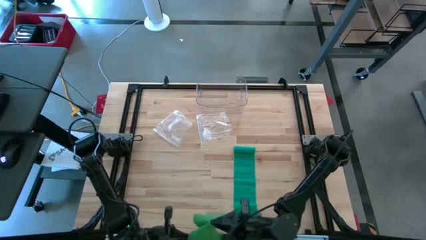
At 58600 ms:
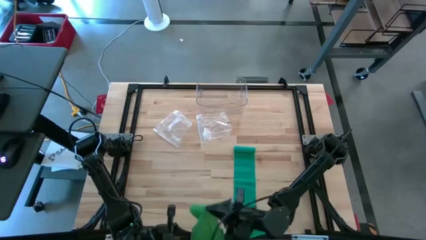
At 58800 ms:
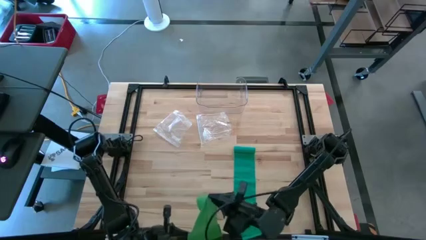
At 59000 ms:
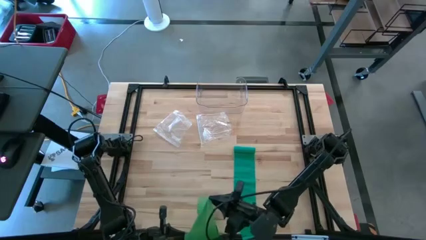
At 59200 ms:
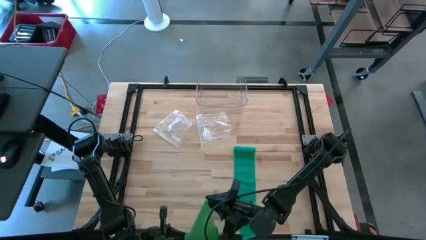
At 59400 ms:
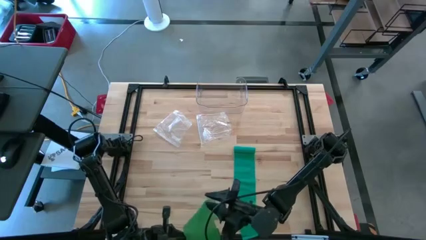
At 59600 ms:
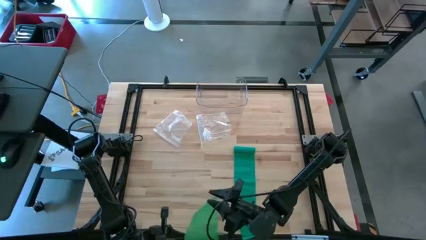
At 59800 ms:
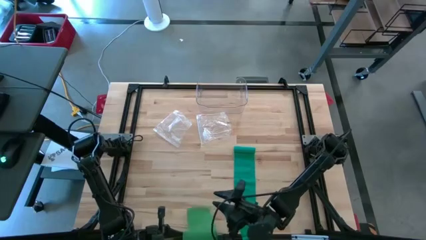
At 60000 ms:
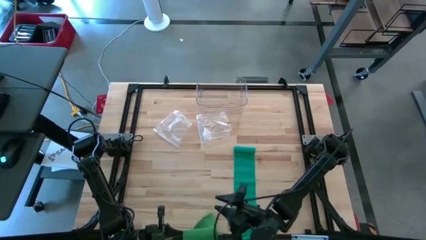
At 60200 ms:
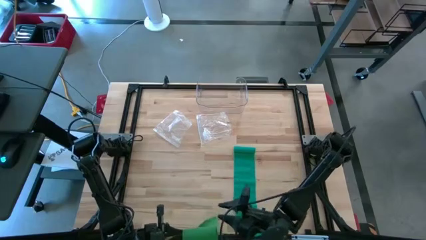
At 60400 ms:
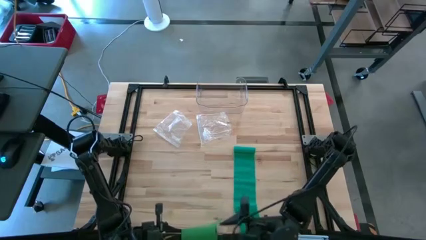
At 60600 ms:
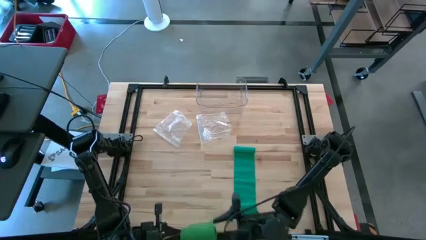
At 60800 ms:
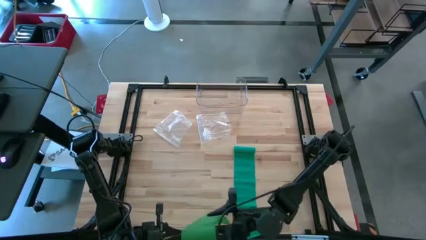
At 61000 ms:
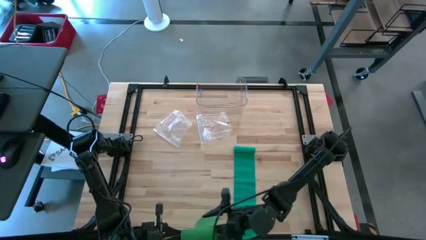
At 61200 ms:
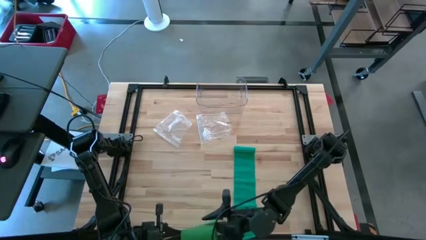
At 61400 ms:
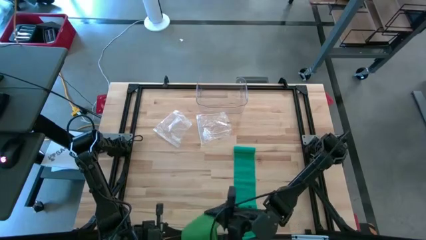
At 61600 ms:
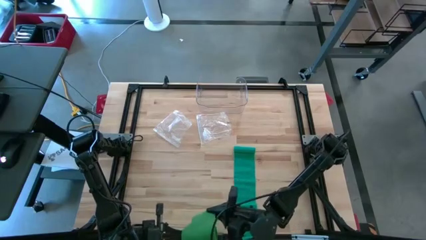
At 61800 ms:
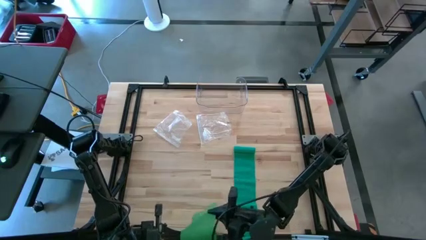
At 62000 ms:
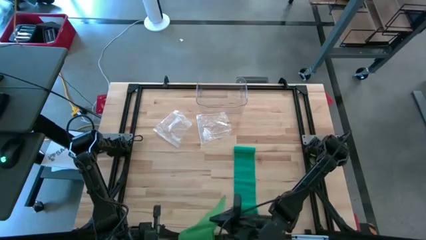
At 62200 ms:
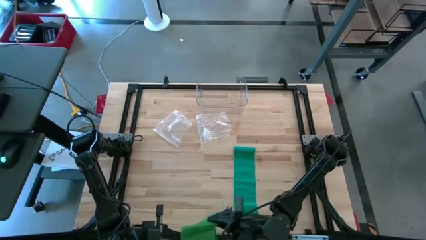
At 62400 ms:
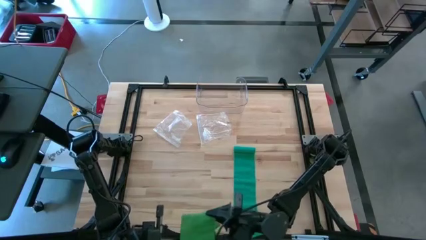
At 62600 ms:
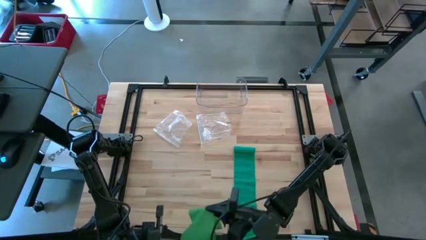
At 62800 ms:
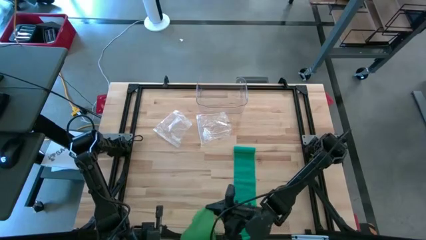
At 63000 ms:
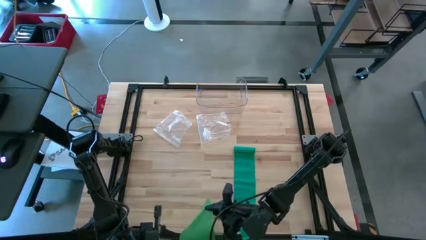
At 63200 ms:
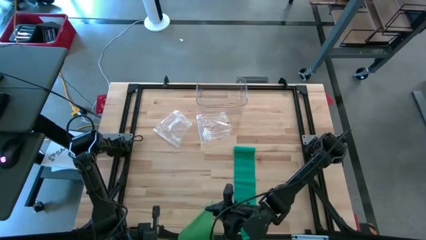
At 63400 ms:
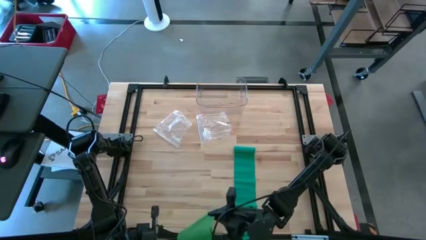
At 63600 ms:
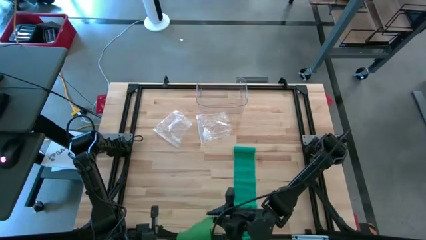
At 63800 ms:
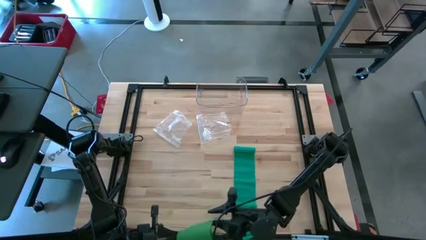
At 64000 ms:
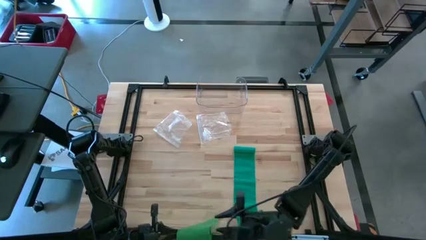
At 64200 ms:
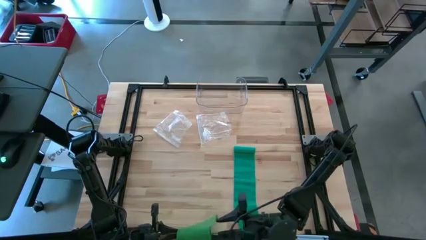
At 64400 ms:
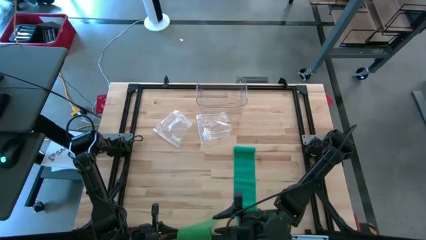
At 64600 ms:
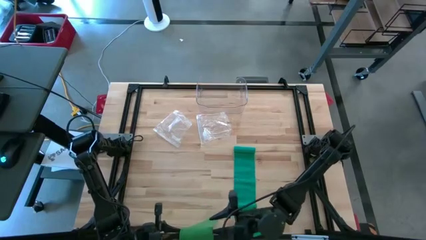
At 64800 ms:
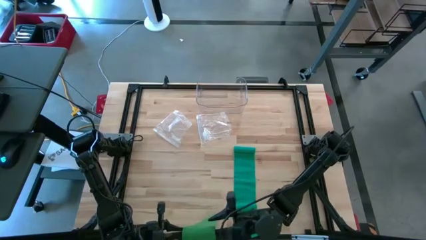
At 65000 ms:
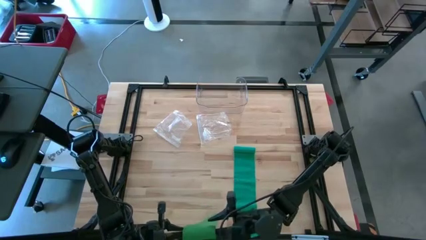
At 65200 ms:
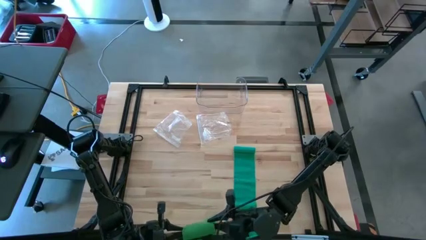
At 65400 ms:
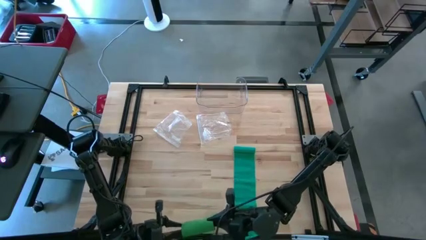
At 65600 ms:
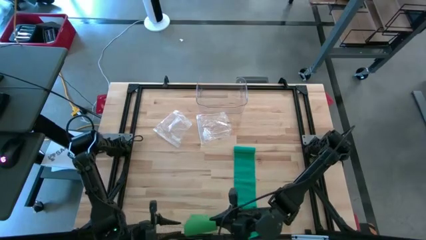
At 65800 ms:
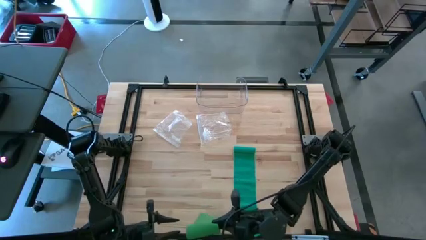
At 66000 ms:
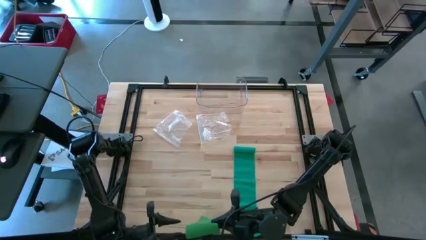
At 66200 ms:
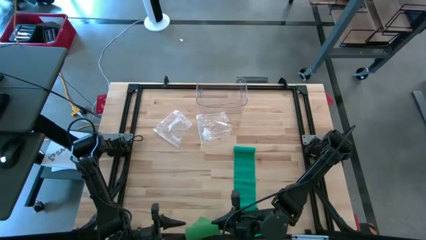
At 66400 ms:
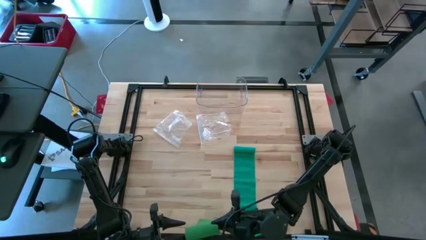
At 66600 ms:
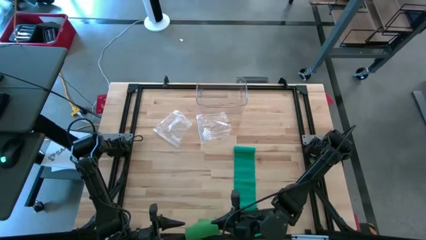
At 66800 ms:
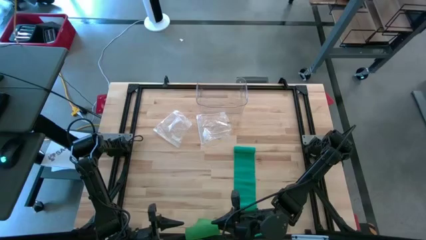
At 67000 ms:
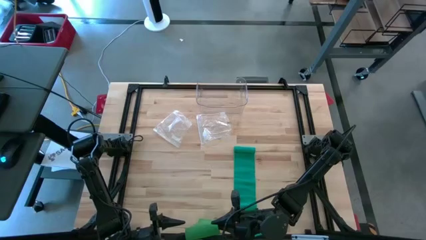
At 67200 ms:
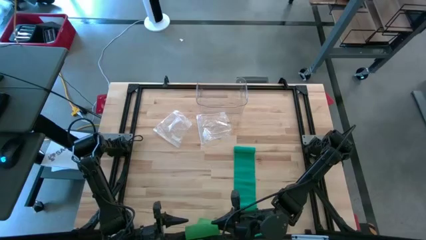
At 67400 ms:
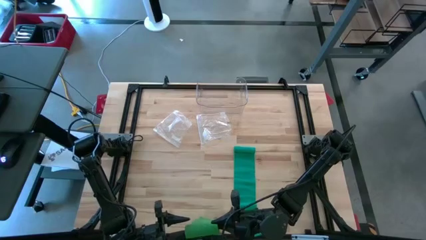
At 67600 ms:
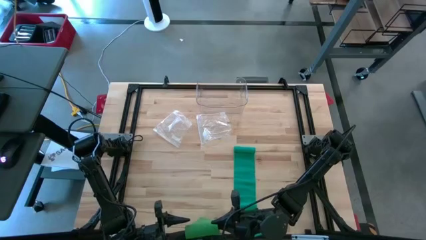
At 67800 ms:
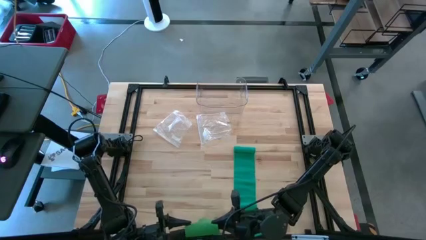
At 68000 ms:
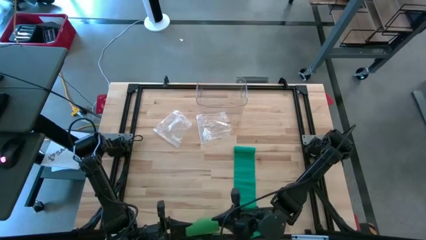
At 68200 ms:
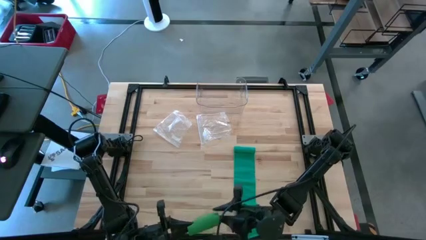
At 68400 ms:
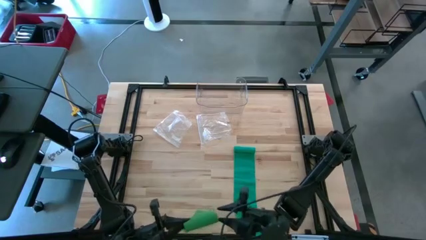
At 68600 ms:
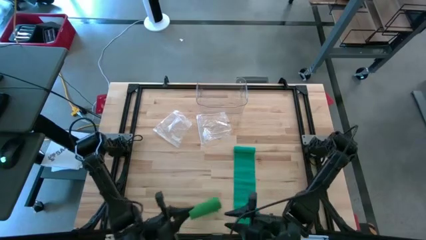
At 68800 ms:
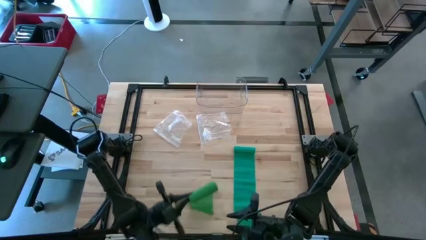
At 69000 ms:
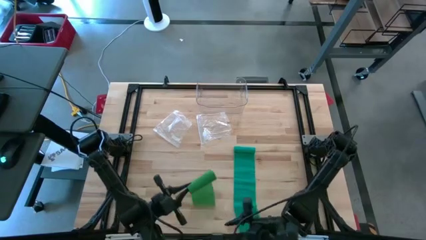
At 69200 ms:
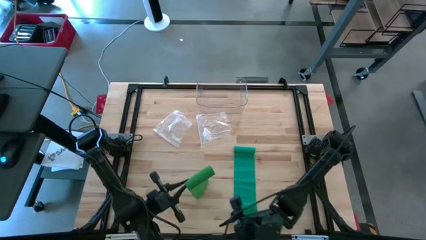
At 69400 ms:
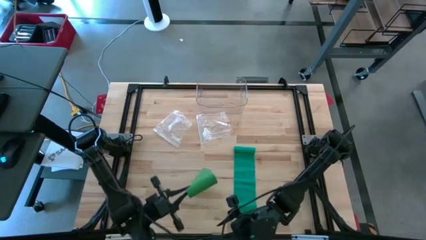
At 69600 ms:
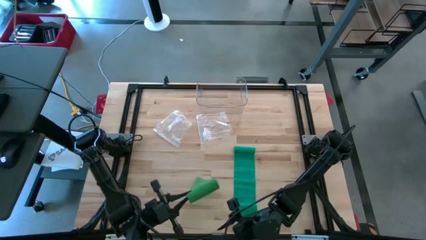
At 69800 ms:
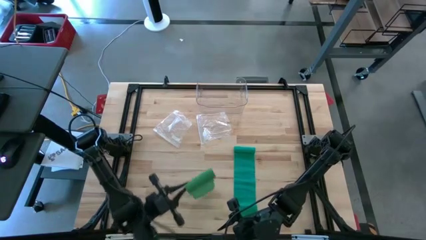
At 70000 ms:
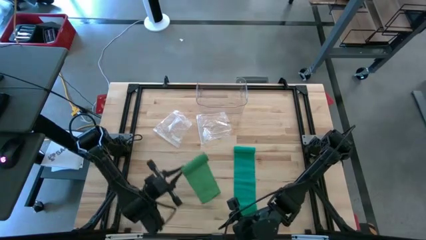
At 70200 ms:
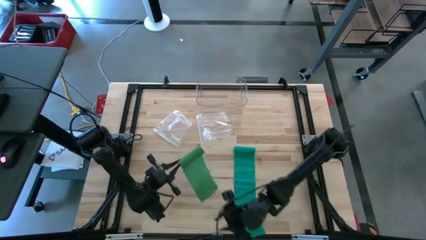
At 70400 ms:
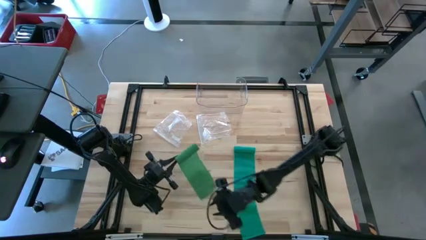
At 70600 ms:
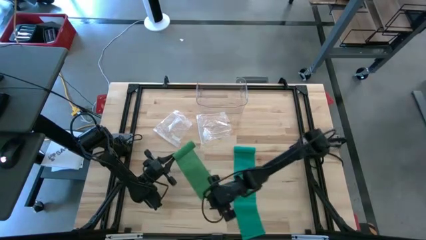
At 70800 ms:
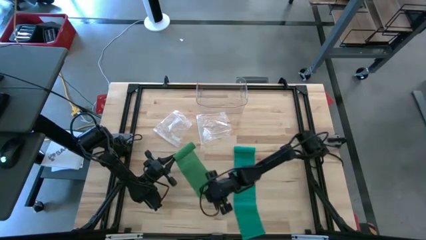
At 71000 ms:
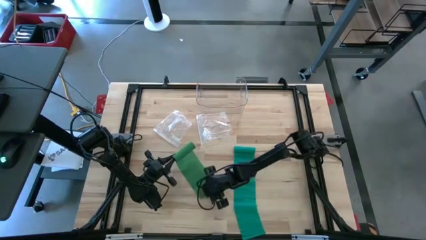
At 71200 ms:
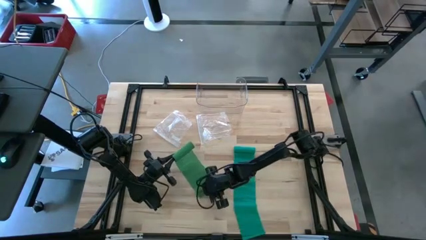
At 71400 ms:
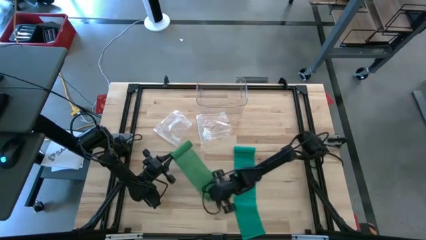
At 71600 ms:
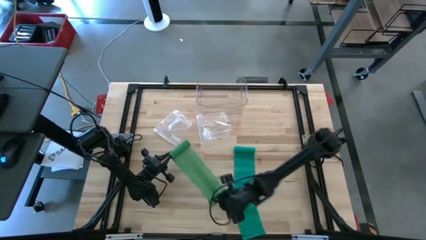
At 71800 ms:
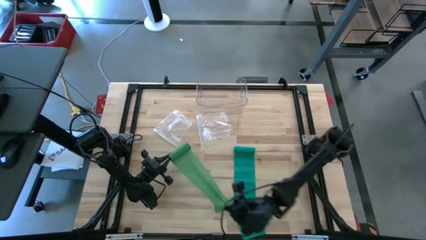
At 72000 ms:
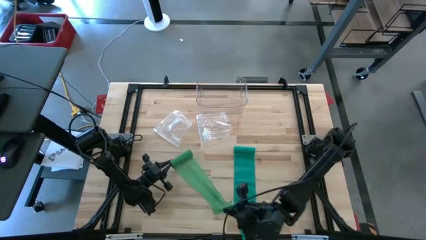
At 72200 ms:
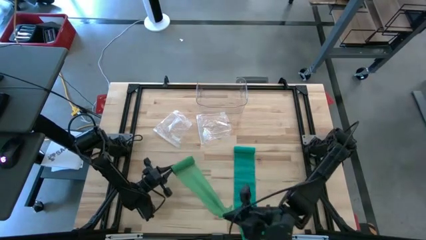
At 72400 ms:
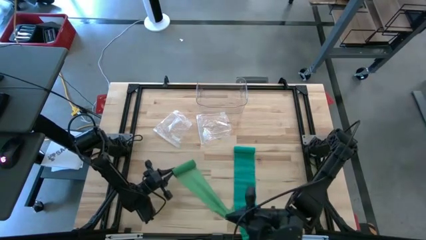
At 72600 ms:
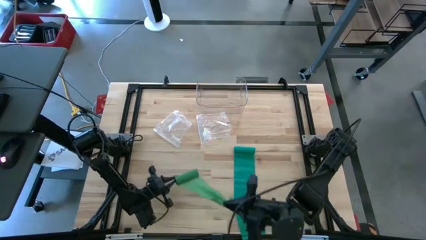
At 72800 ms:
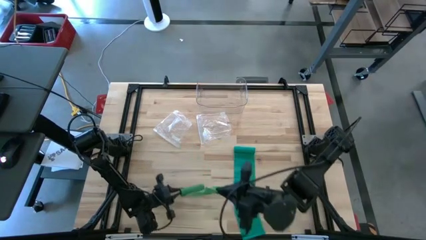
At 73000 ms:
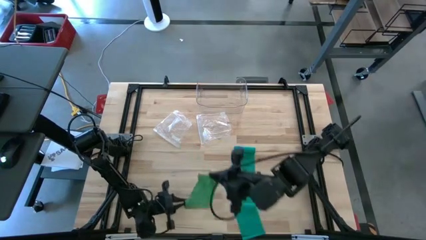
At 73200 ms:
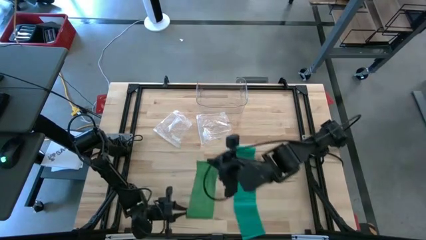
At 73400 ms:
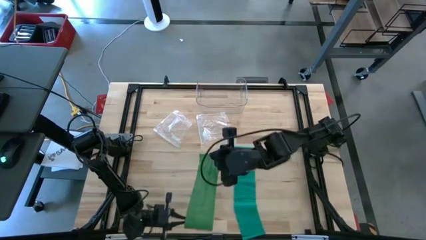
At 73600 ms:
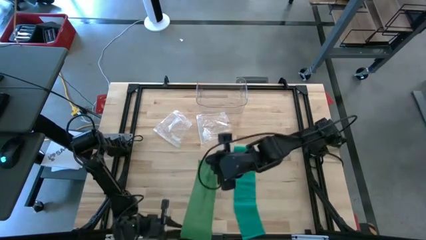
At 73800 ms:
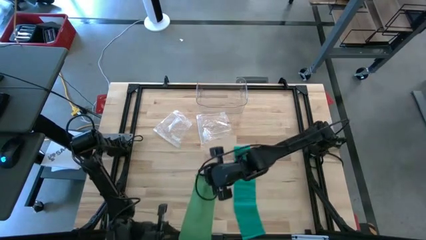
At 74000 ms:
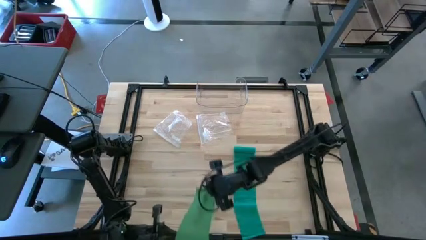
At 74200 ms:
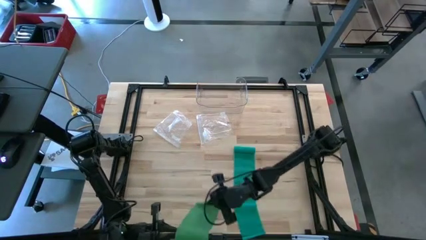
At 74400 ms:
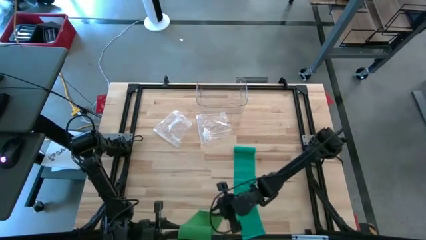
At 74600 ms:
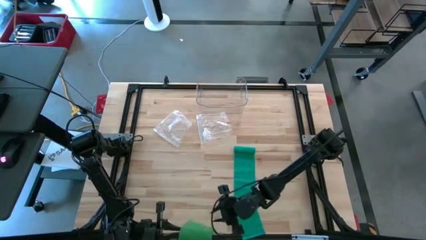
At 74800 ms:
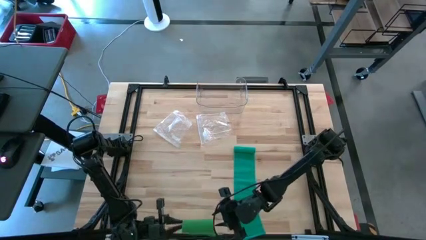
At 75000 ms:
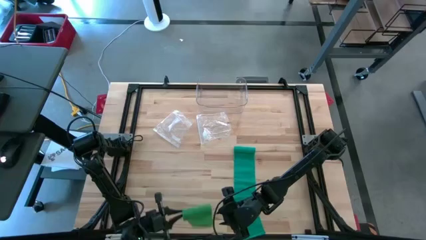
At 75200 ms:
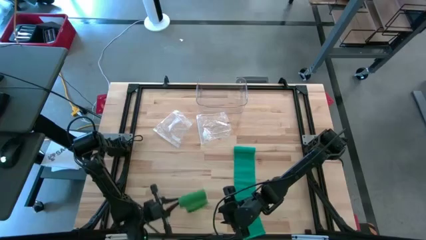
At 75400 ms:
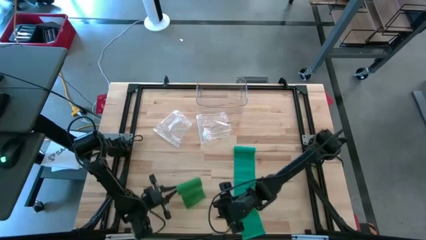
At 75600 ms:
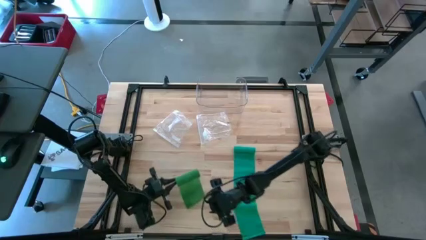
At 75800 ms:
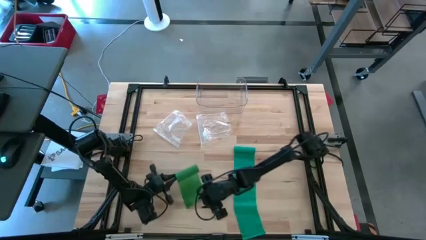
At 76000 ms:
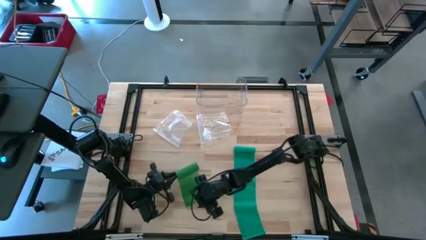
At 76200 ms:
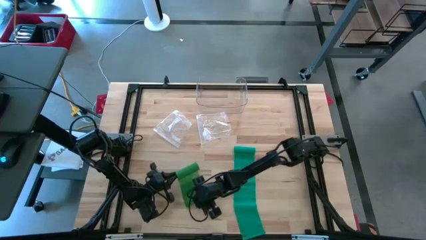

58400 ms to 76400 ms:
Task: Roll bandage
Roll the green bandage
